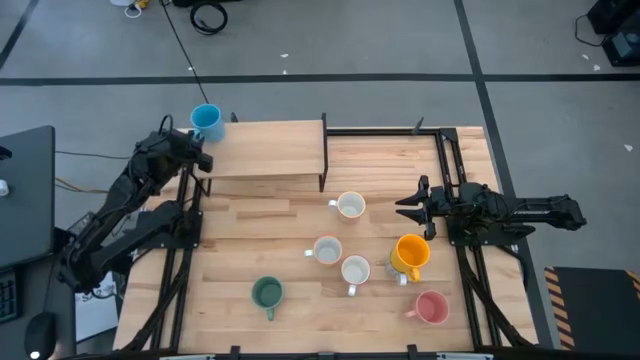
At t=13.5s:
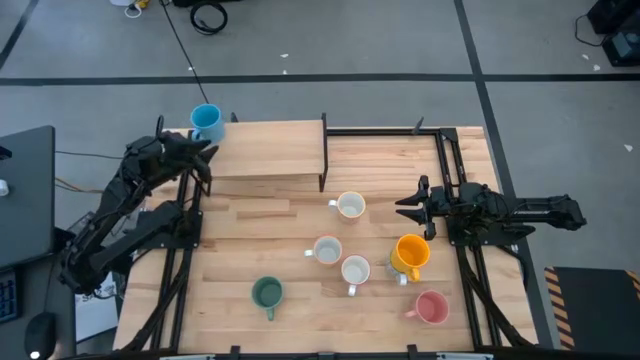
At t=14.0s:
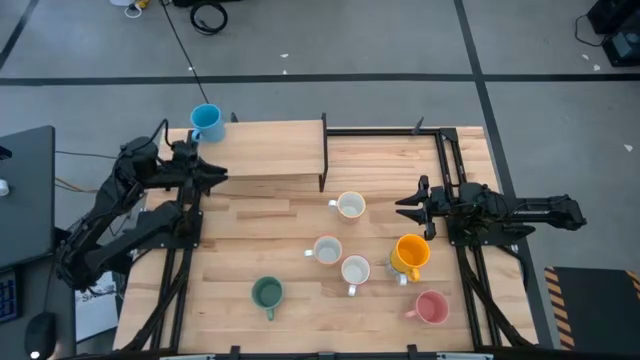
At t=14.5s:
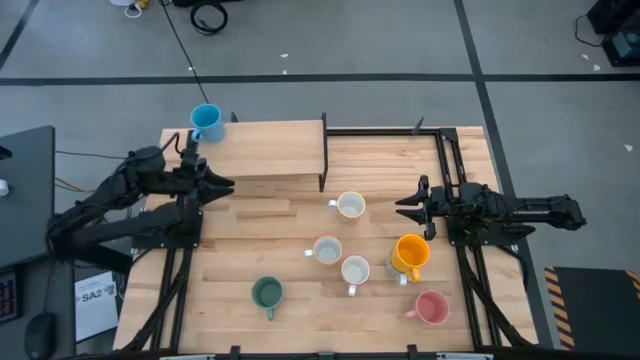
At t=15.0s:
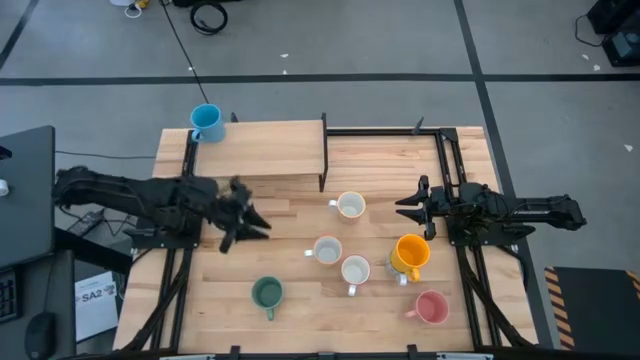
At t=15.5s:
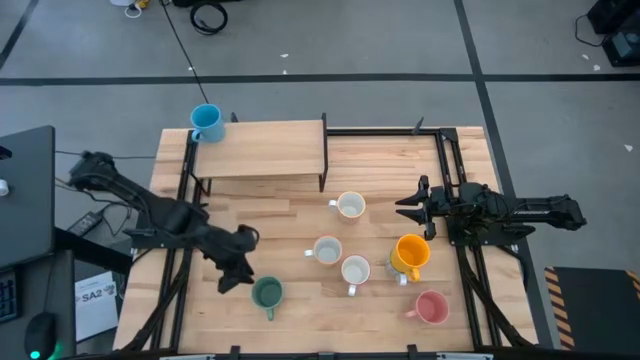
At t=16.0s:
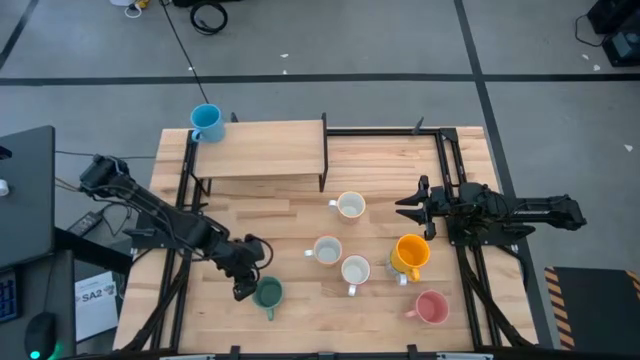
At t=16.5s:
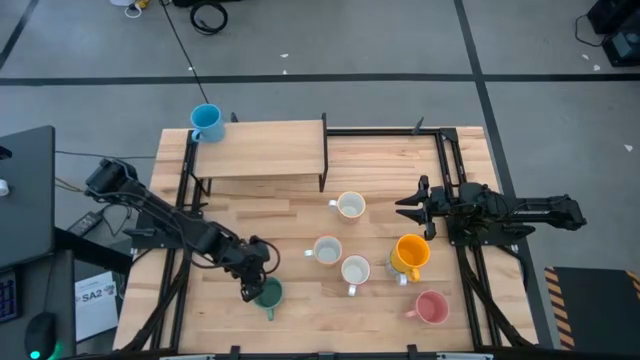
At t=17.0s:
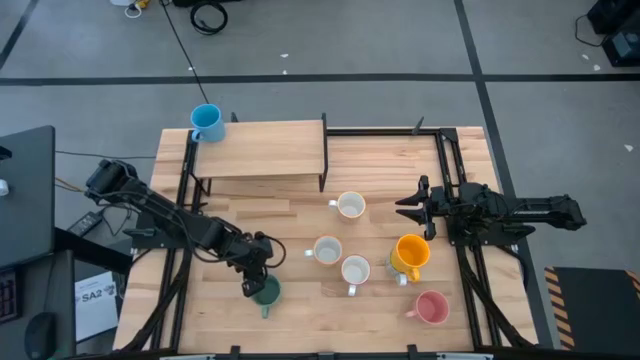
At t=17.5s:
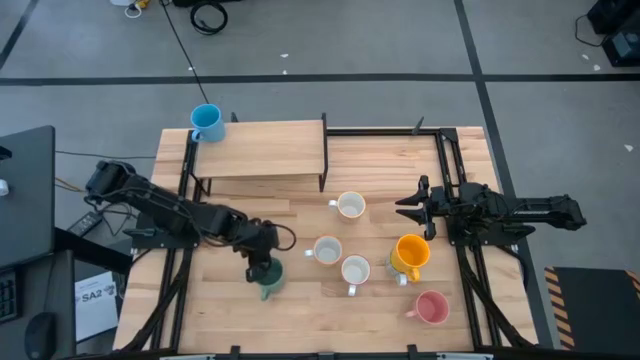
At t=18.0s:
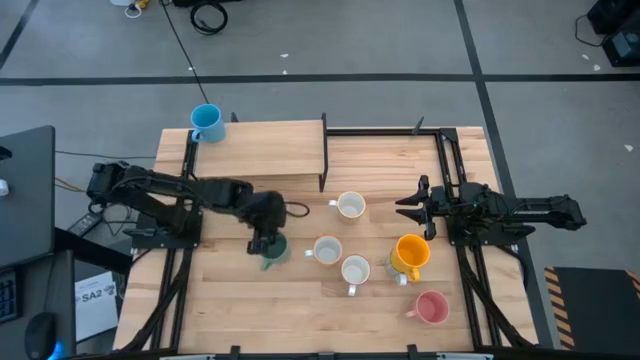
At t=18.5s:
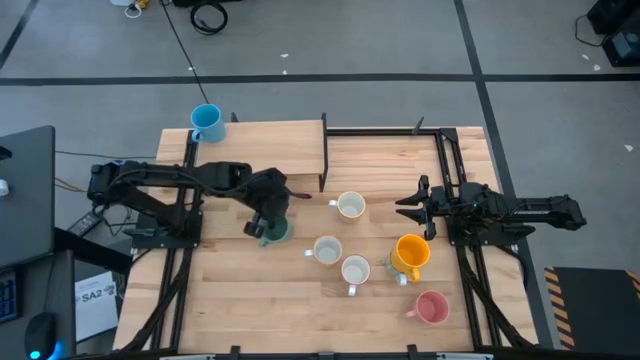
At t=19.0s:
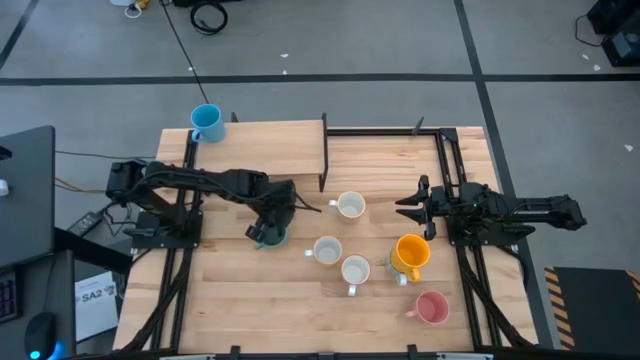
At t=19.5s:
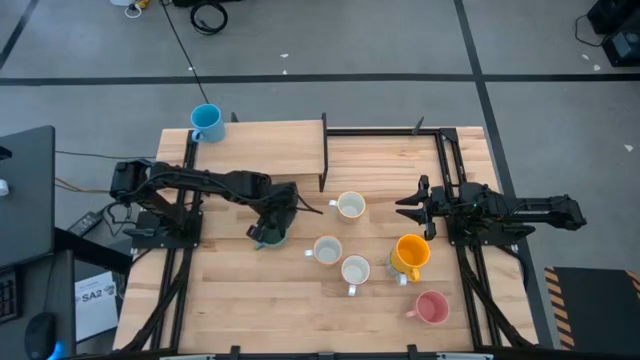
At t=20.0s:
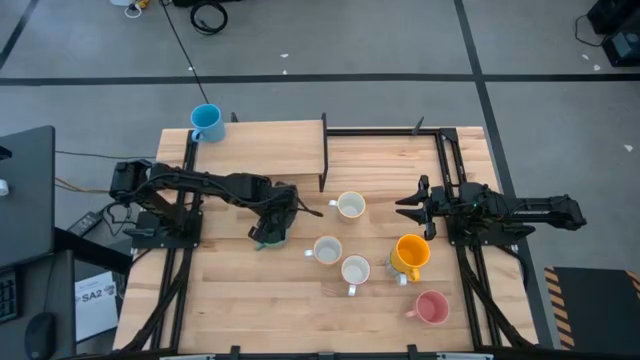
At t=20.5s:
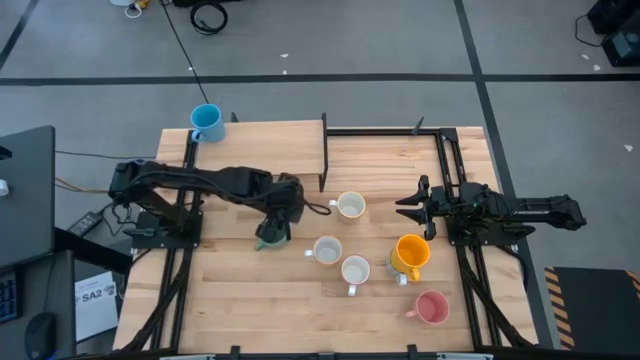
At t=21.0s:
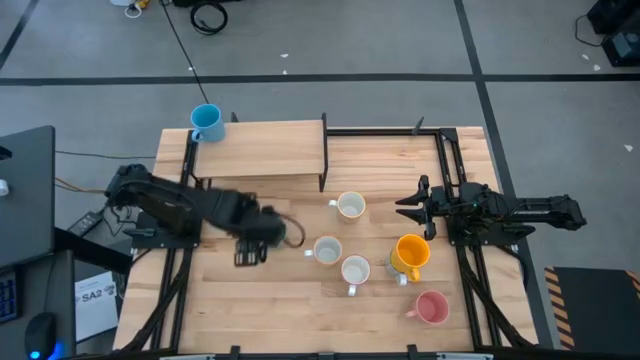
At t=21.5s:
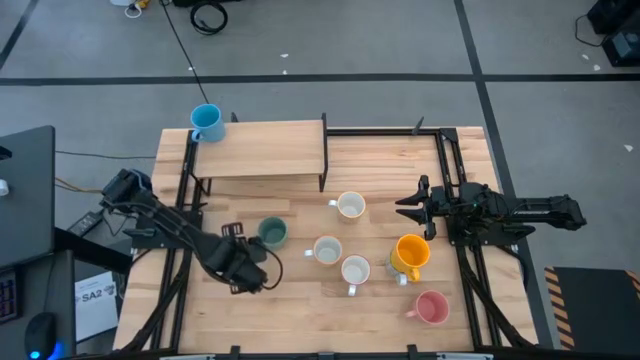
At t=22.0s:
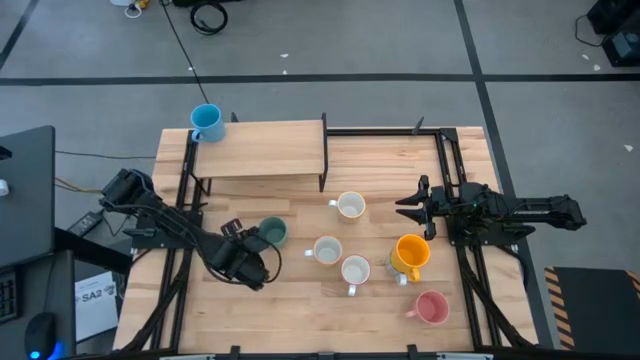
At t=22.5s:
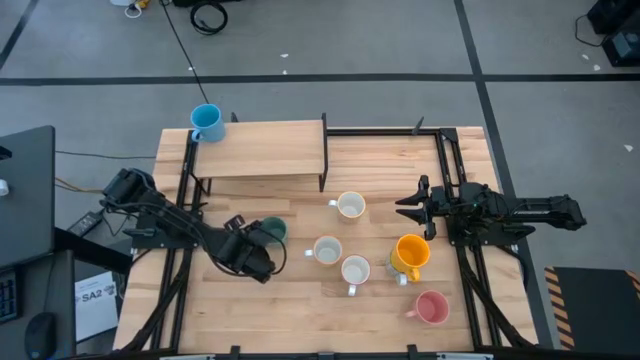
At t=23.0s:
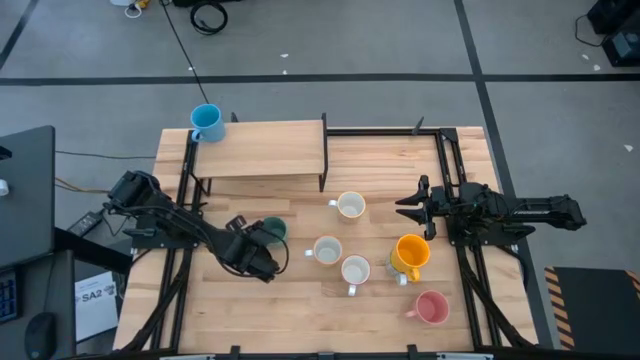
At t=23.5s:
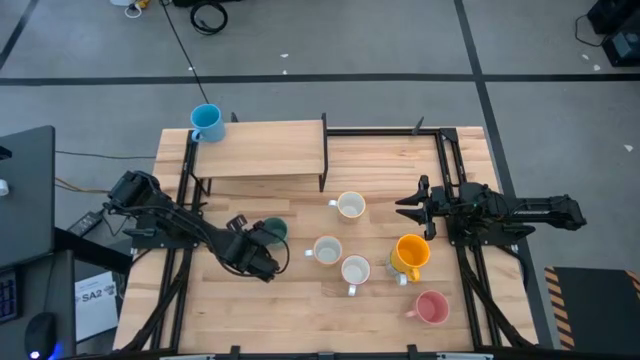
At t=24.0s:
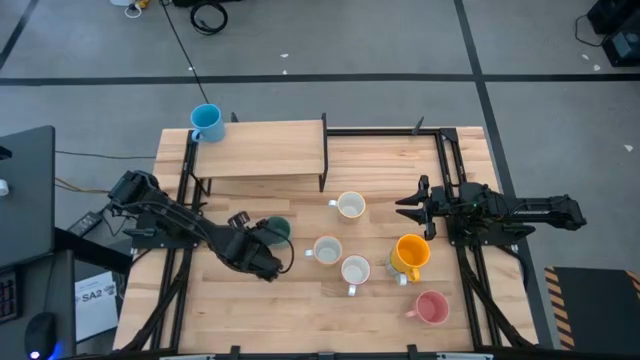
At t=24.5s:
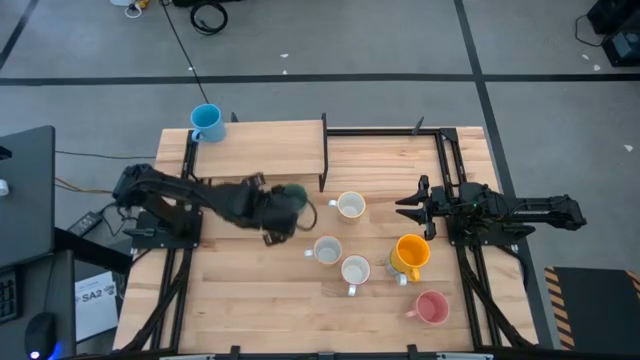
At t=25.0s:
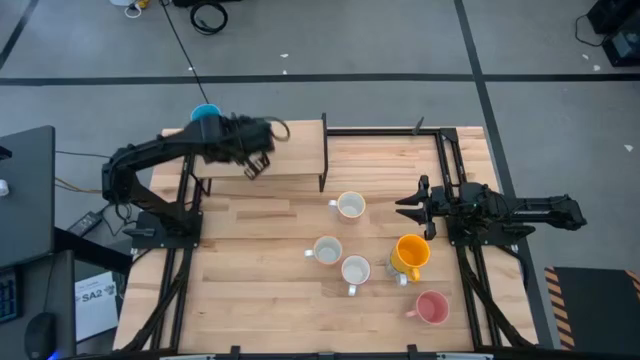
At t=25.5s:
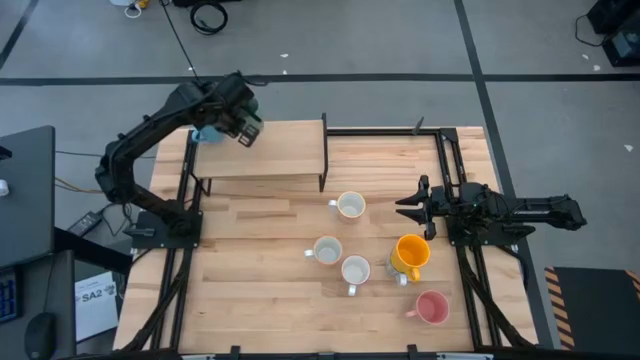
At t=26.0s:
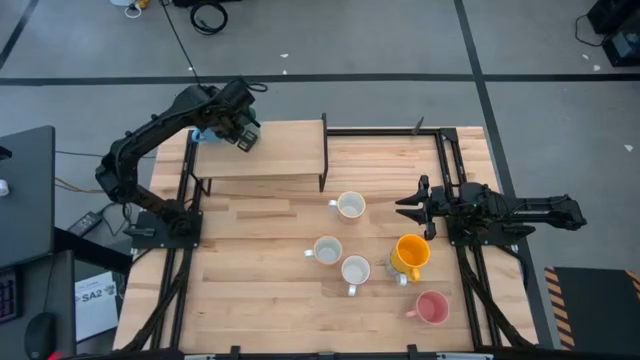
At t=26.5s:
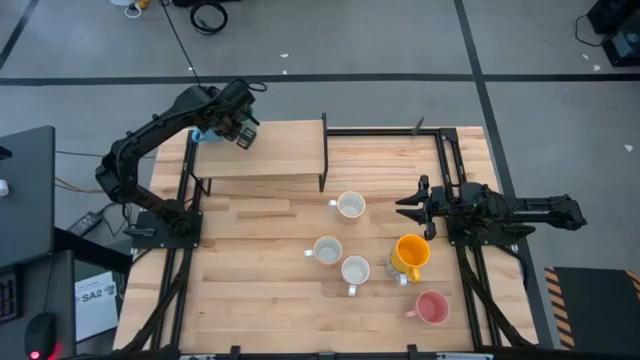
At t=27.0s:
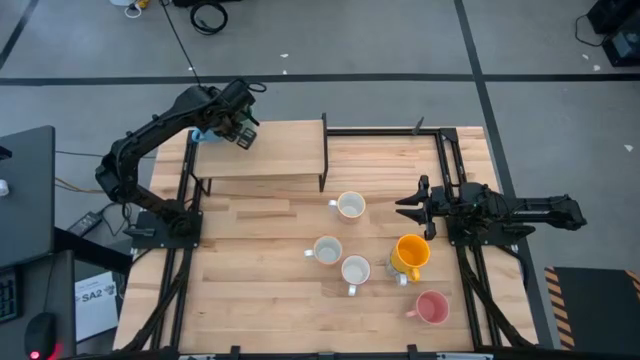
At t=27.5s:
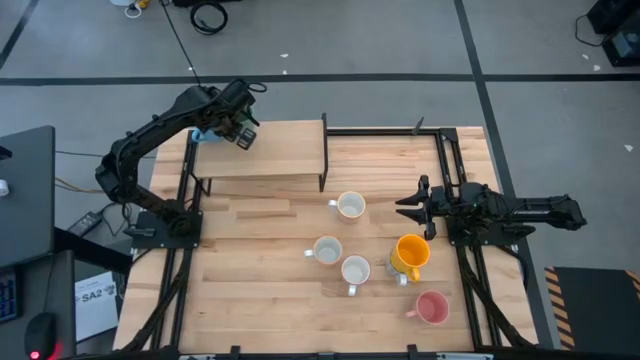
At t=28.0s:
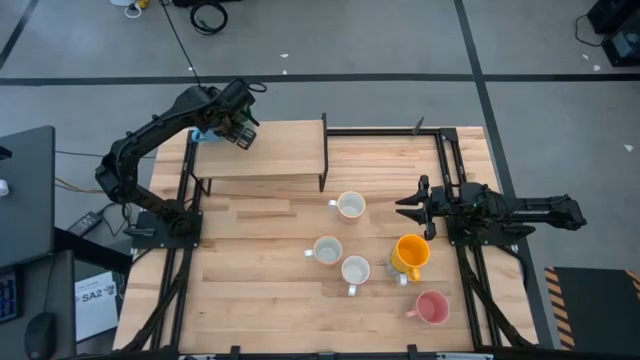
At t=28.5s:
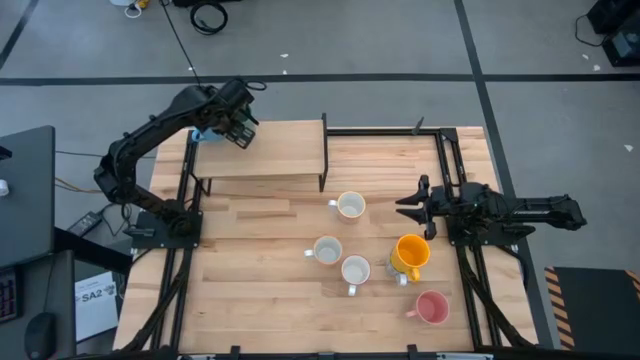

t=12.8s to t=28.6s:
Task: Place coffee mugs
Put the green mug on the shelf

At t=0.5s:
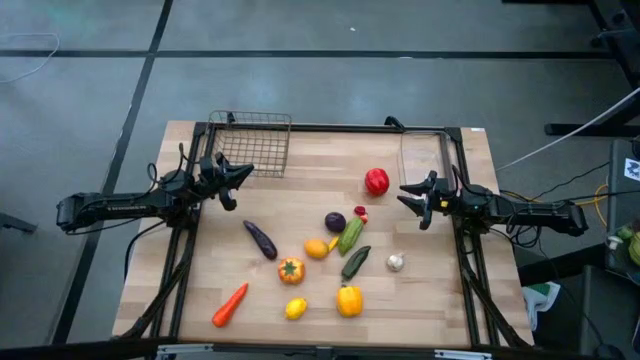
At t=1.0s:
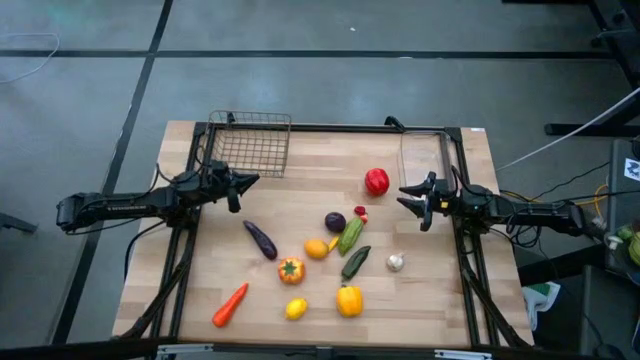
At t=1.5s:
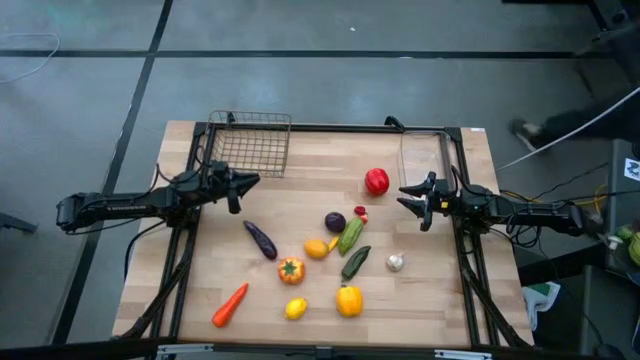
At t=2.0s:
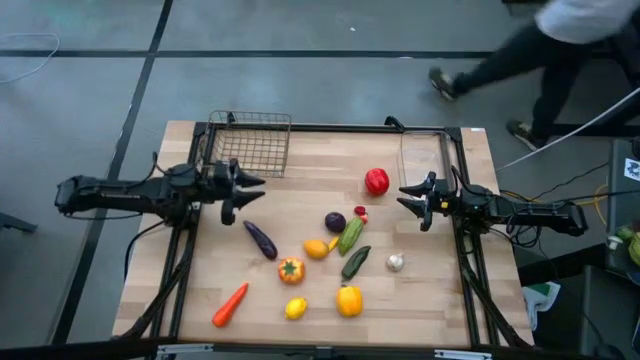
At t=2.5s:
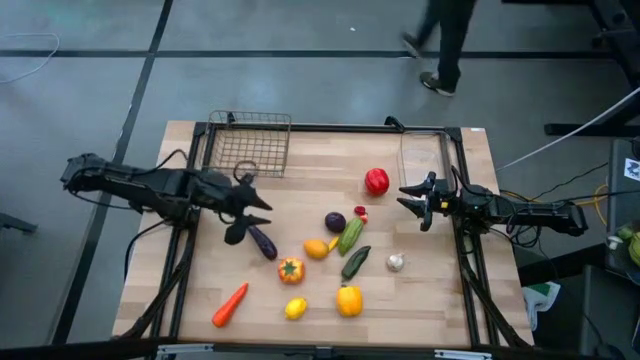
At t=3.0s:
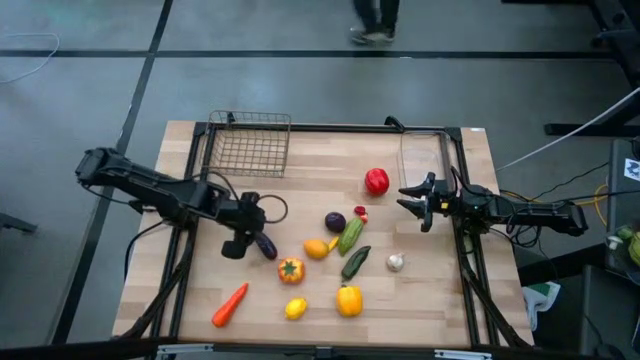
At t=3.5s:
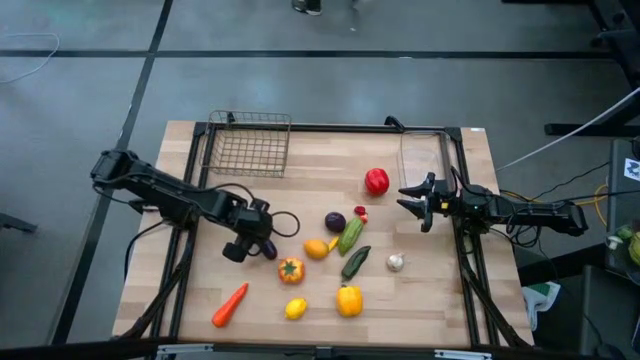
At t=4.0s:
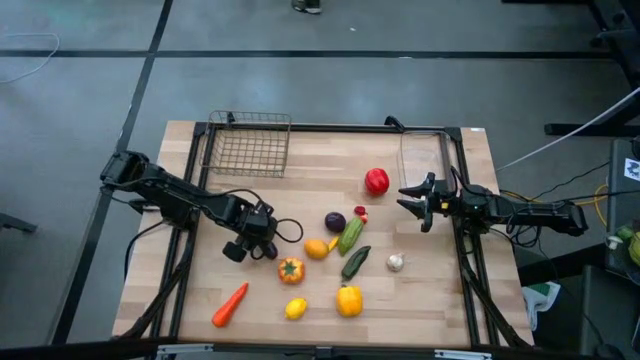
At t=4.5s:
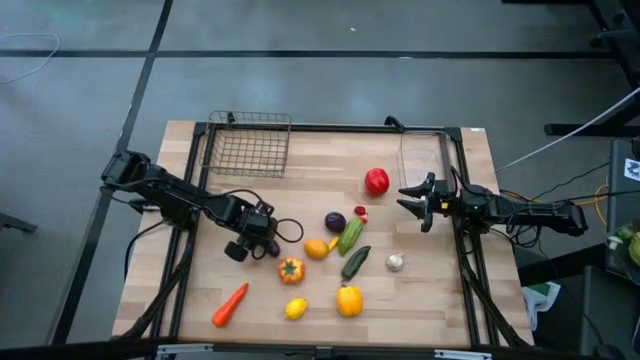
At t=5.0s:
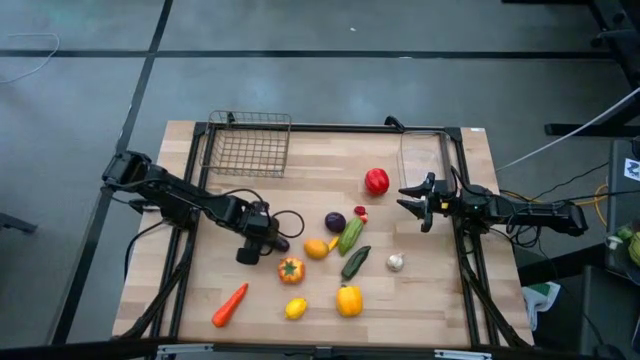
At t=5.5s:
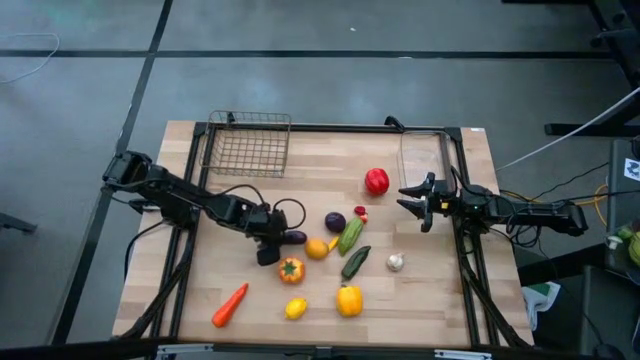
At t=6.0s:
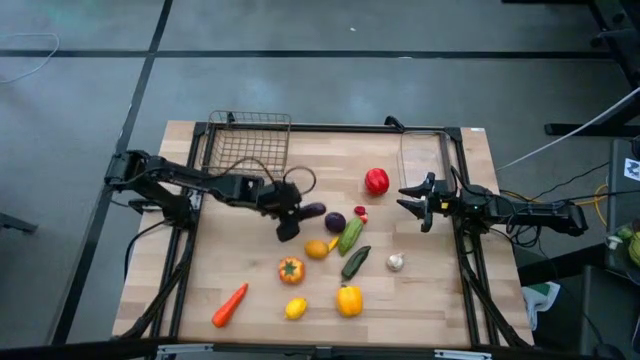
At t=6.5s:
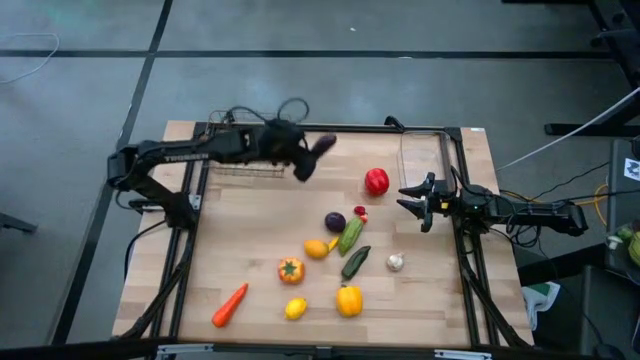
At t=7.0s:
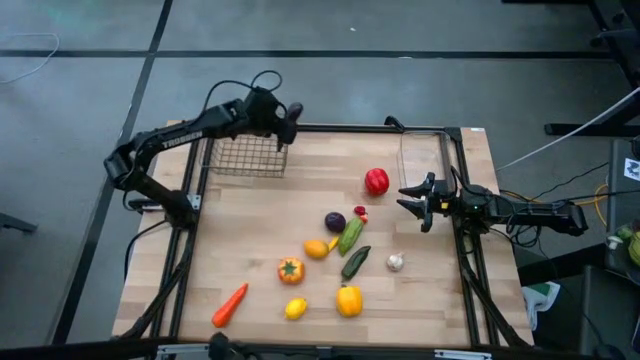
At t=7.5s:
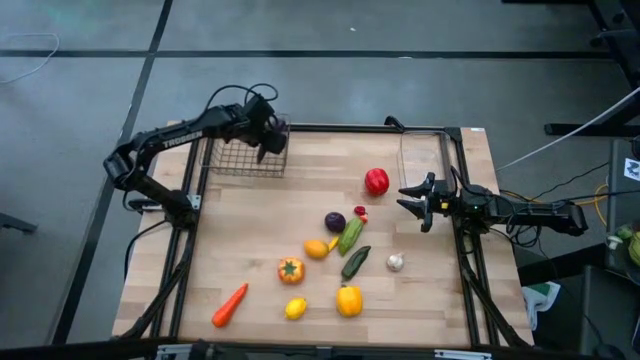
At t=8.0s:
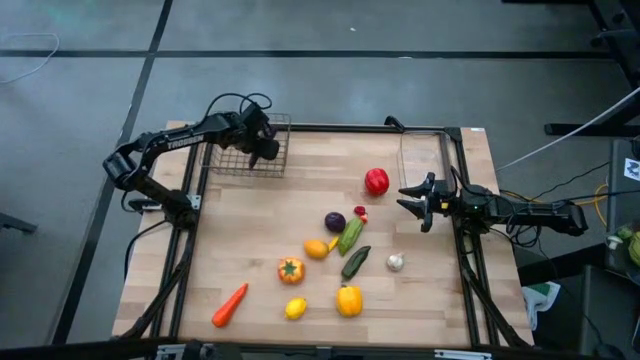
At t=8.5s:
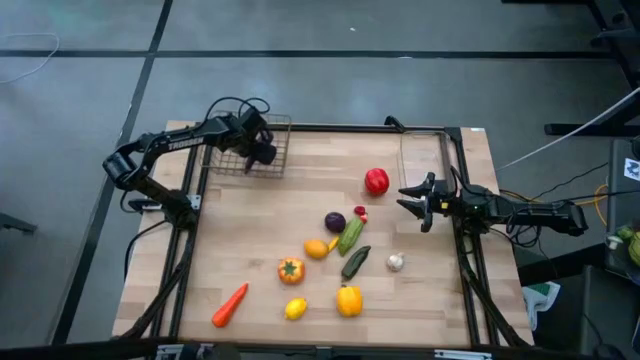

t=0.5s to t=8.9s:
Task: Sort produce into baskets
Put the violet eggplant into the silver wire basket
